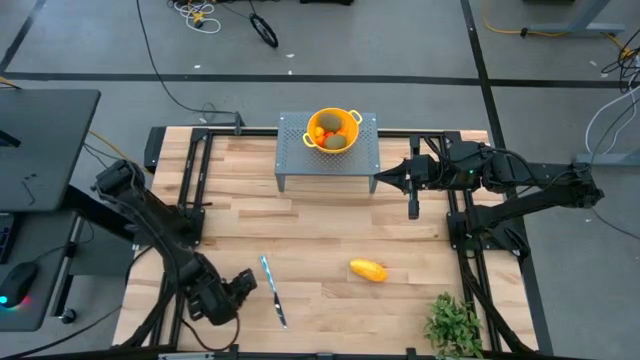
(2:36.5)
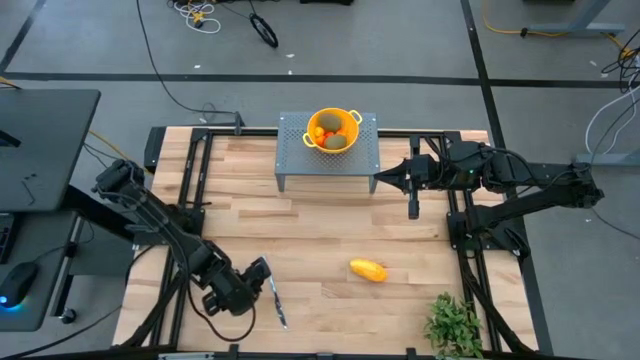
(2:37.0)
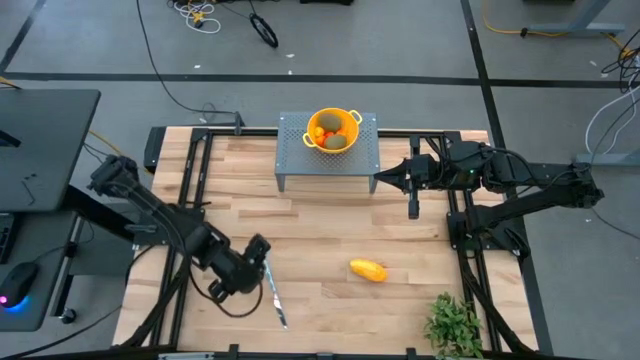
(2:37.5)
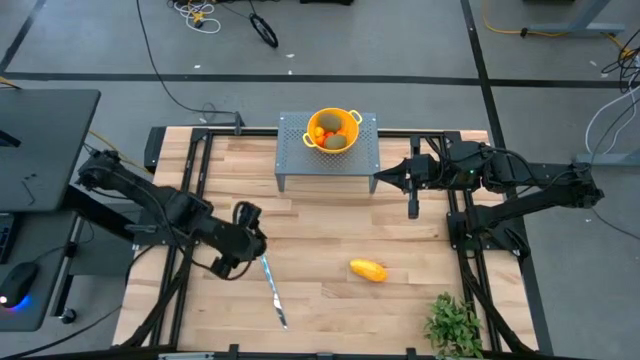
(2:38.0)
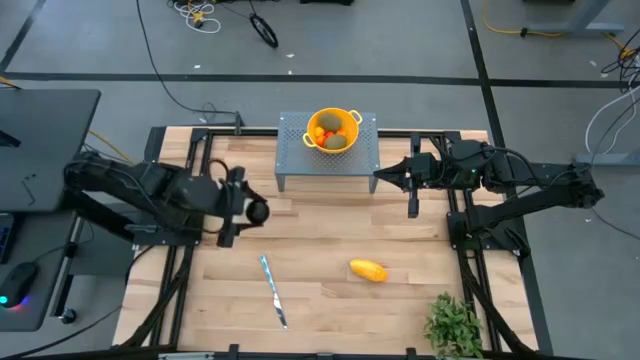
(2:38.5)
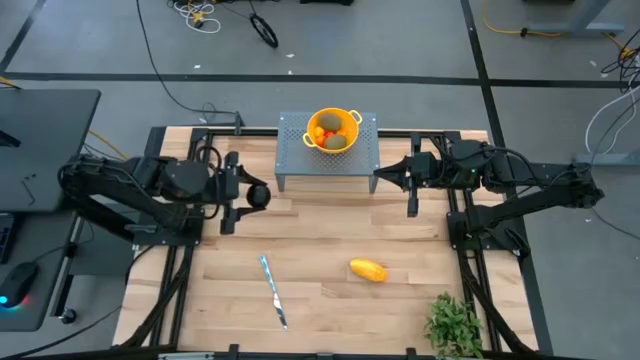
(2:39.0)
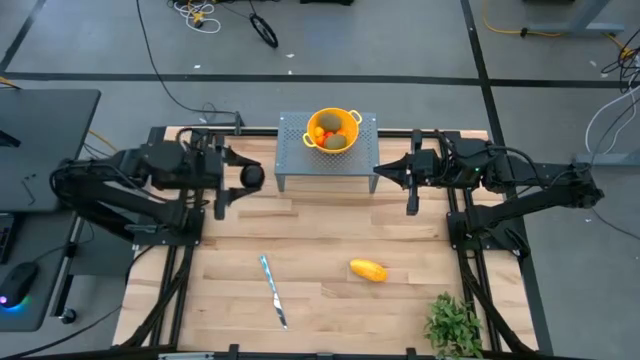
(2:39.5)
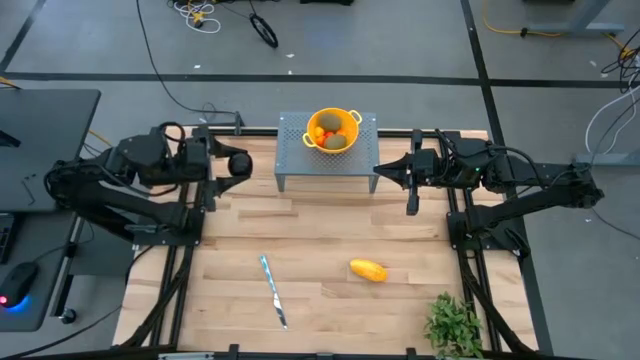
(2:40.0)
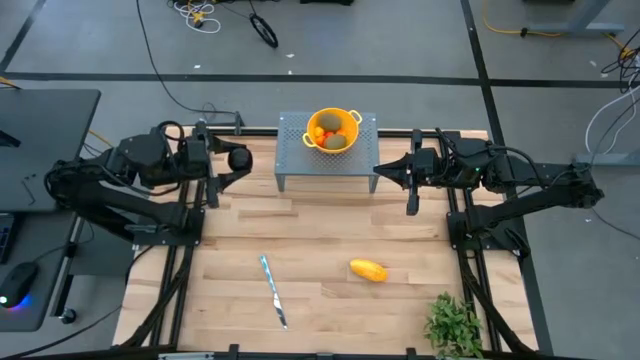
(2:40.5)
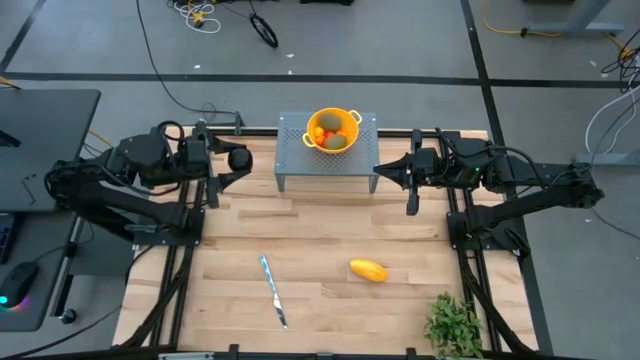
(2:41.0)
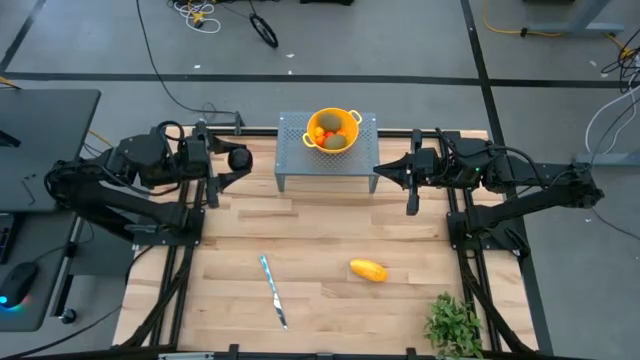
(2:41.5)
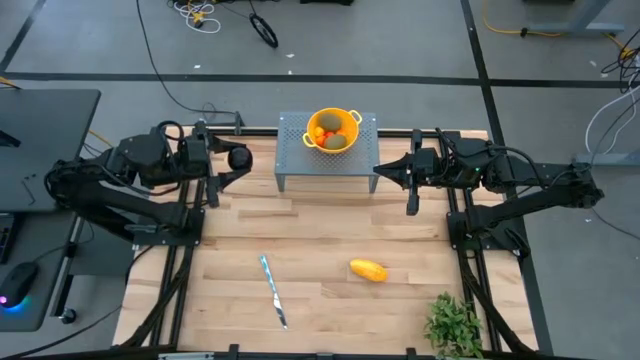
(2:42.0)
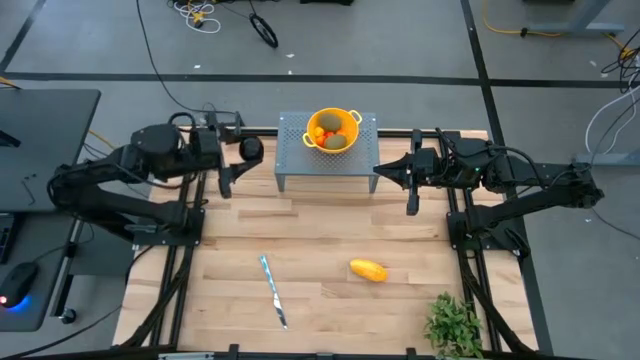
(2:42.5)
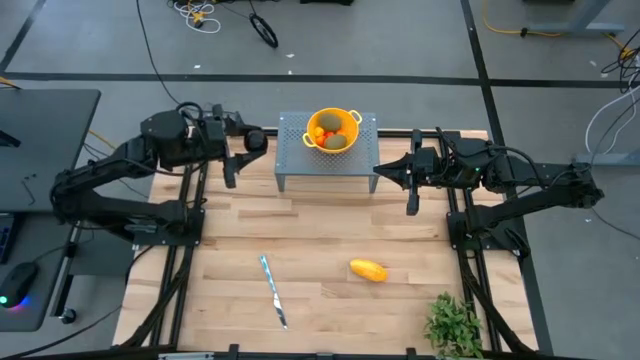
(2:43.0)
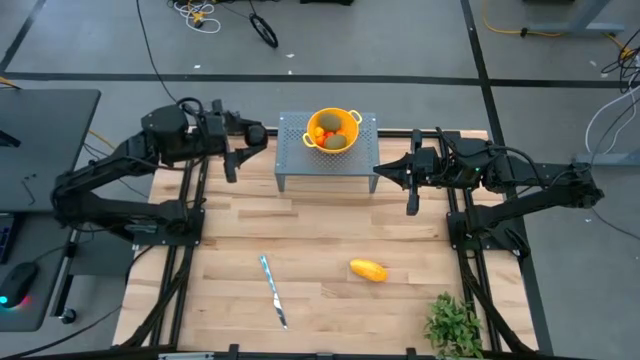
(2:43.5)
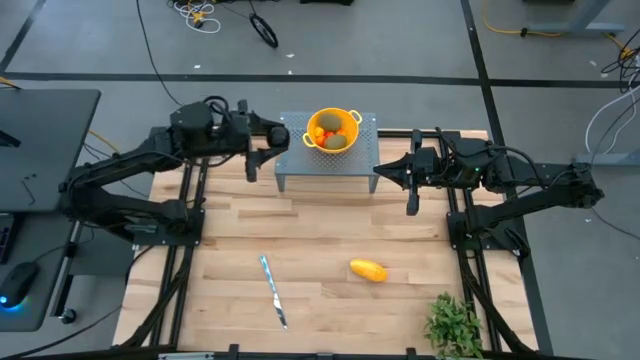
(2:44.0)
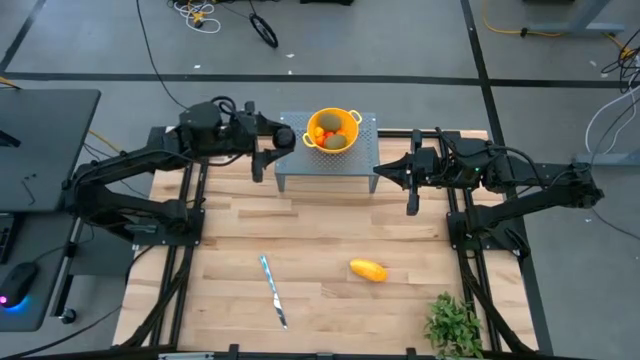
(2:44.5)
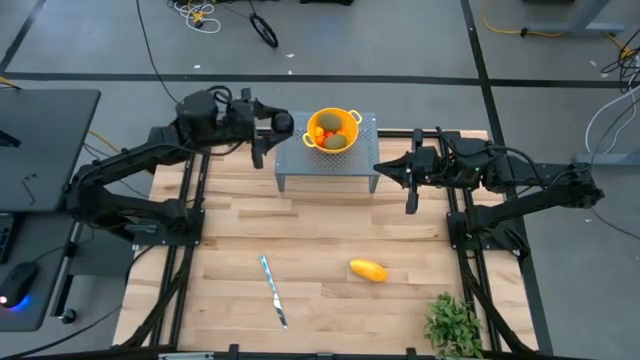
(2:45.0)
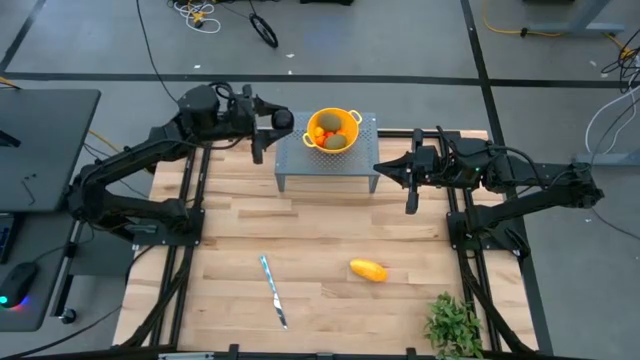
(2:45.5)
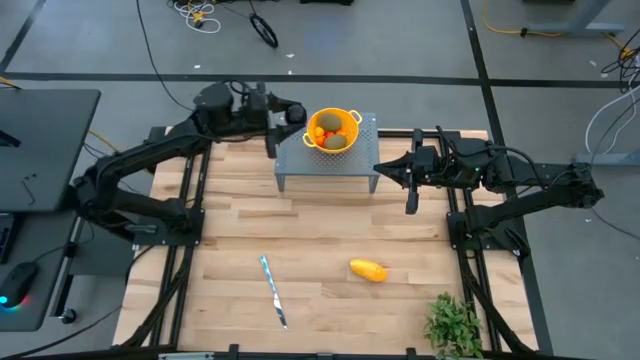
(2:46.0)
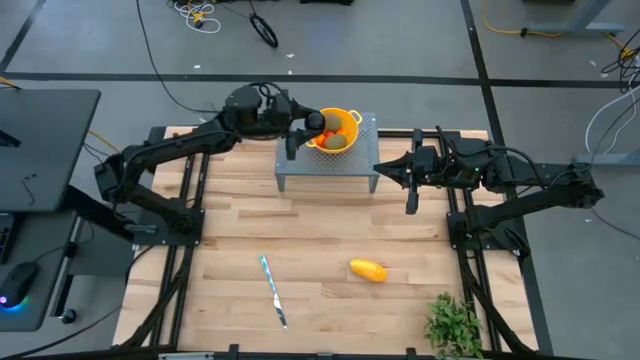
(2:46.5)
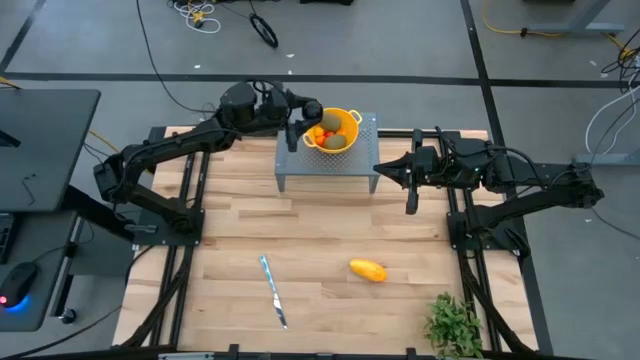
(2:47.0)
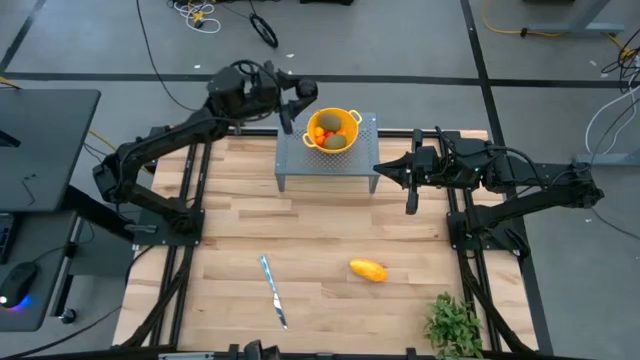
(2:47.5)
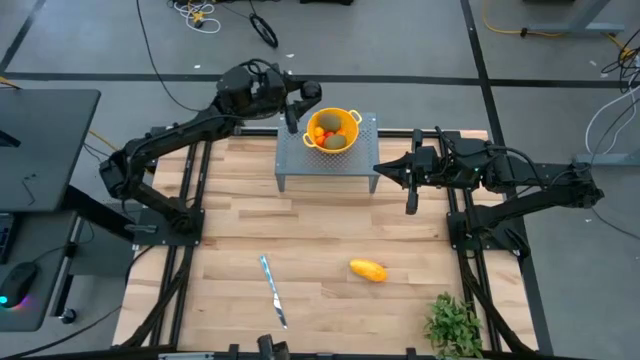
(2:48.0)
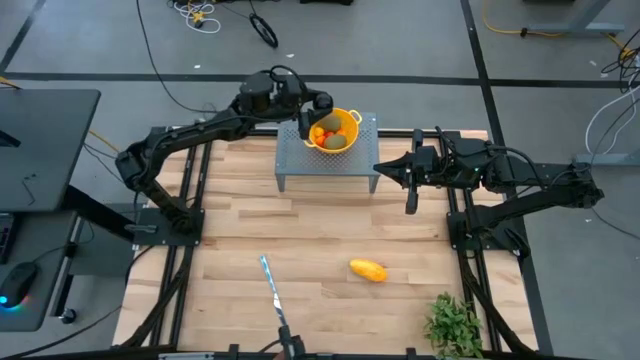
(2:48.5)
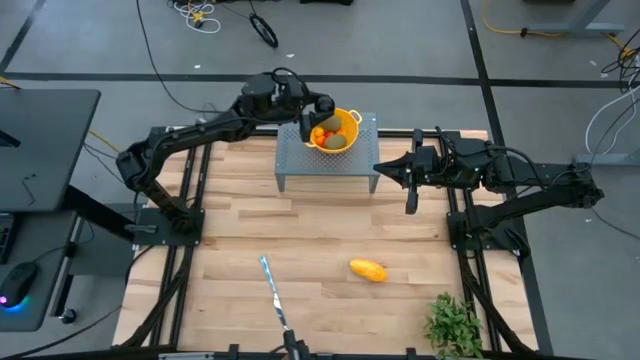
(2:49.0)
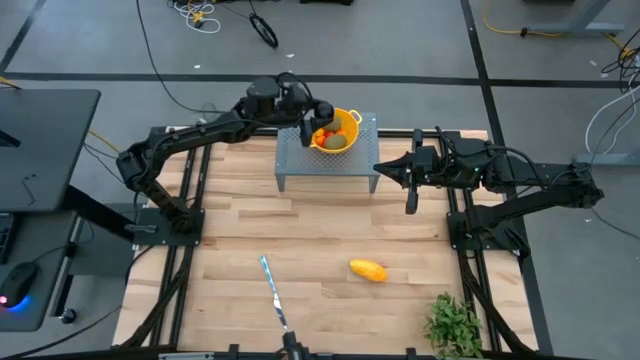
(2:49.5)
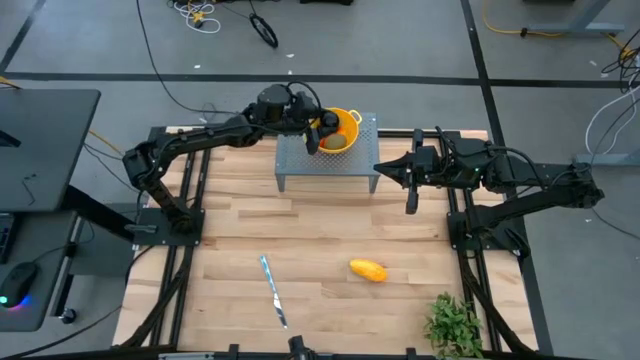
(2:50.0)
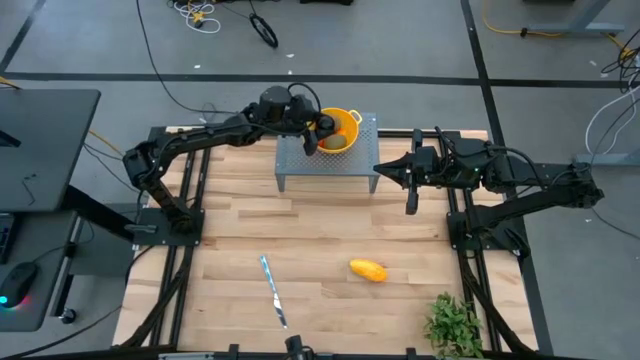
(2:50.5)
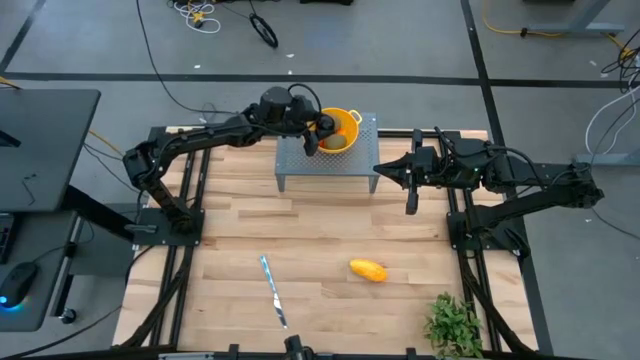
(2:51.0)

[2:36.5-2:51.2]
Task: Pick & Place Fruit
Put the plum into the yellow colander bowl on the shelf

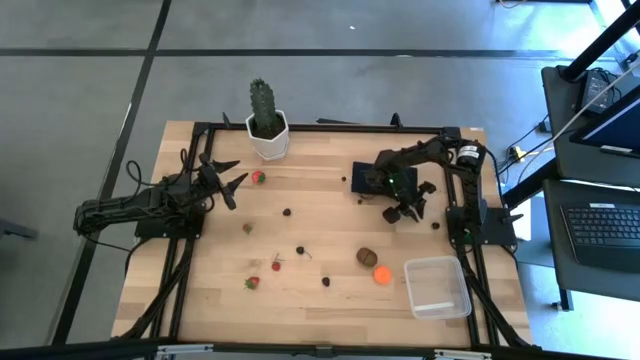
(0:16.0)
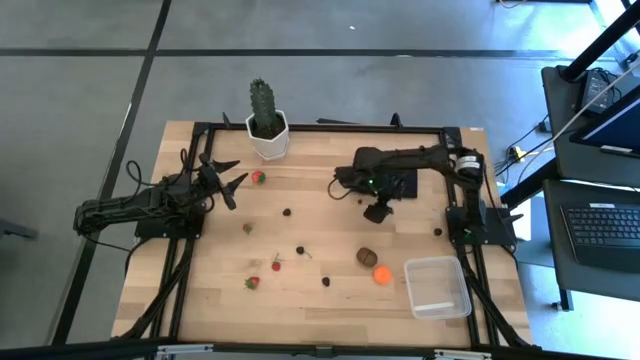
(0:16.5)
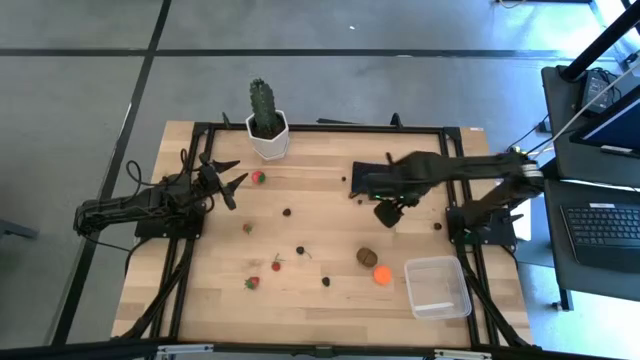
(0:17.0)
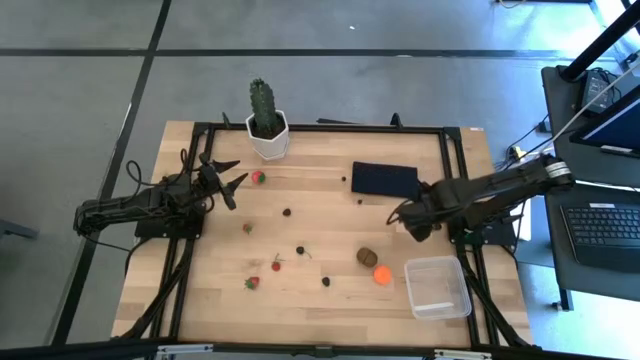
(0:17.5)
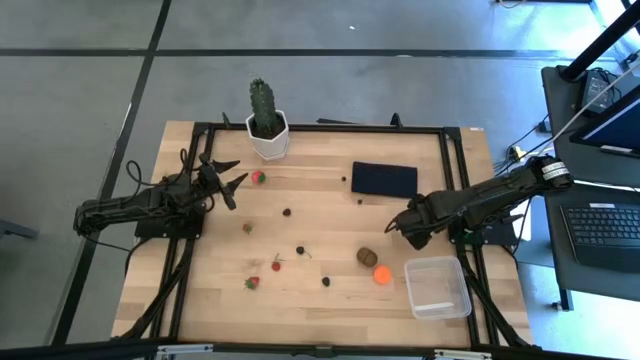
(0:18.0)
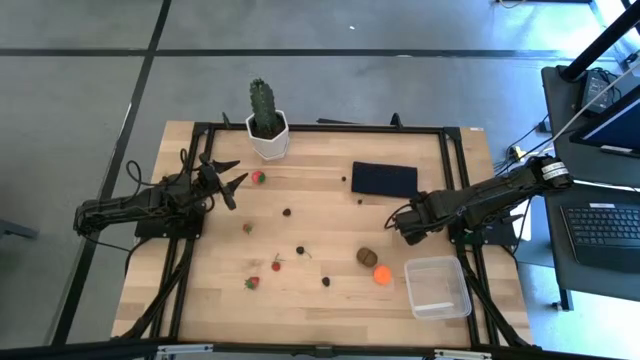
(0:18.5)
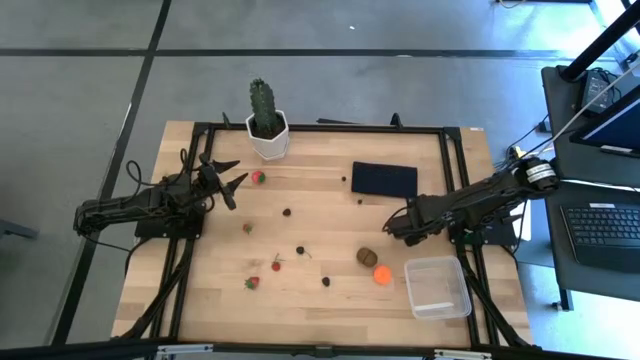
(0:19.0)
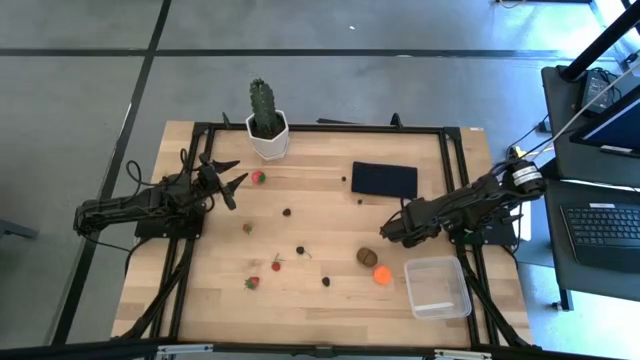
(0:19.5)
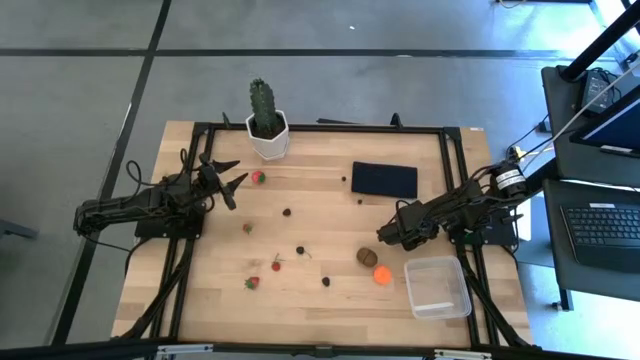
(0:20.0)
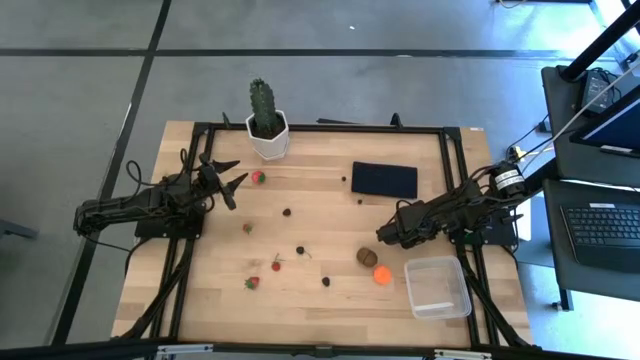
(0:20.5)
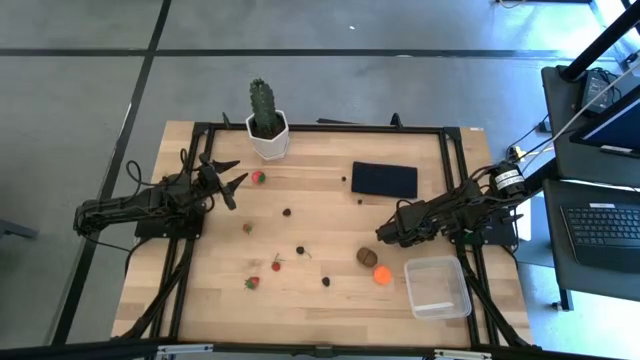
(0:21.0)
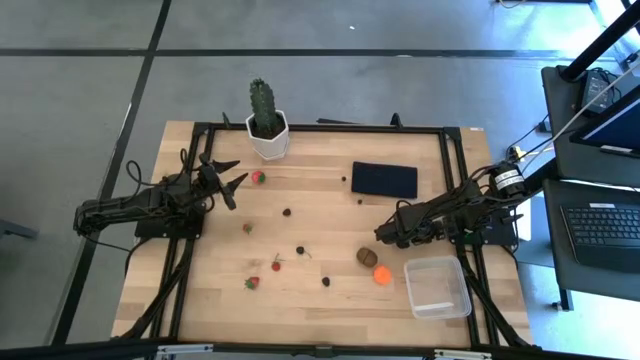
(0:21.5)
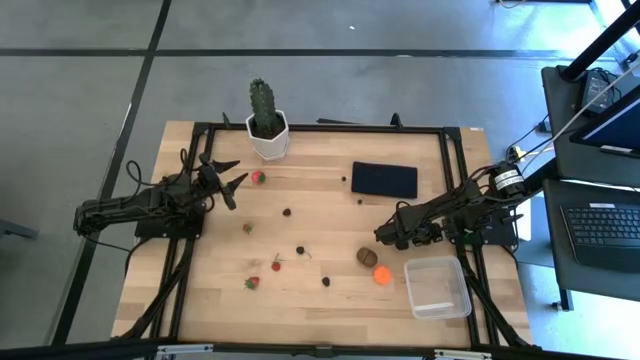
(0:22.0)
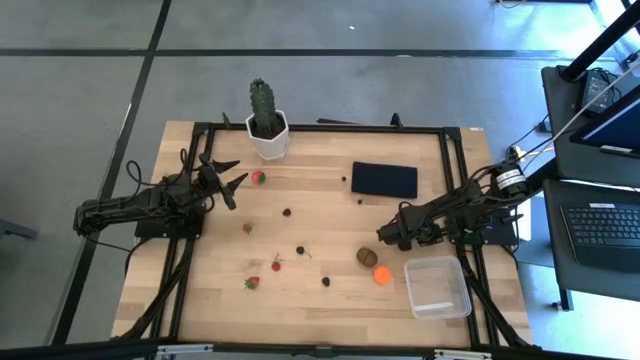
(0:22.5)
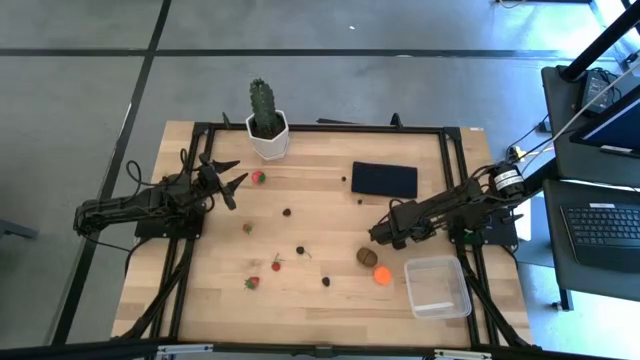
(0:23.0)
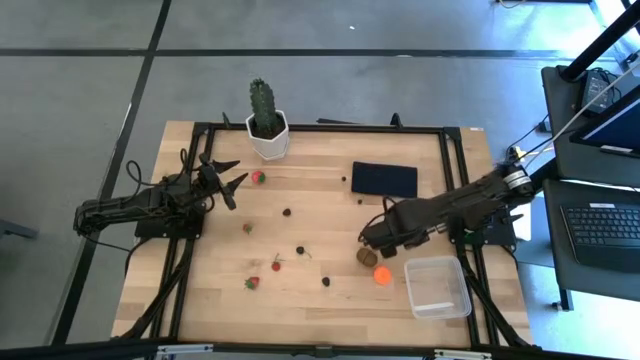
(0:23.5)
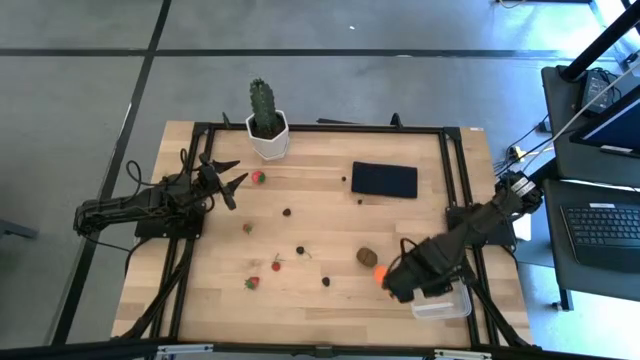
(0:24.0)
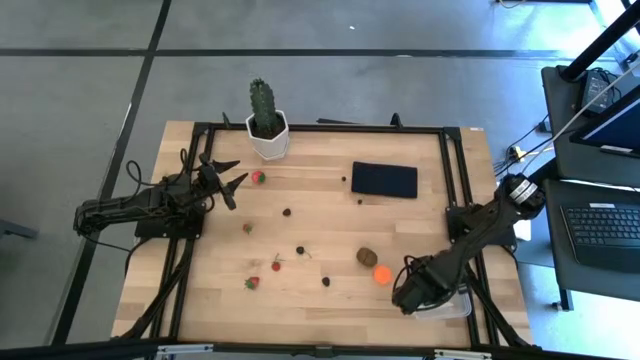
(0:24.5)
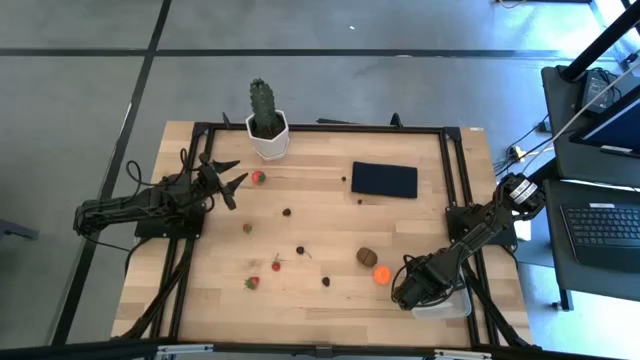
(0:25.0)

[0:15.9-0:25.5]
Task: Pick and placing Produce into tupperware
Put the right black cherry into the transparent bin
